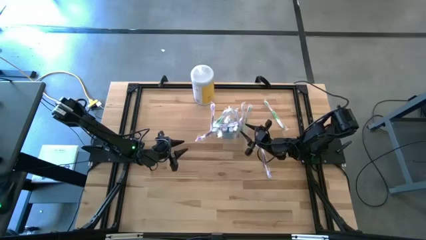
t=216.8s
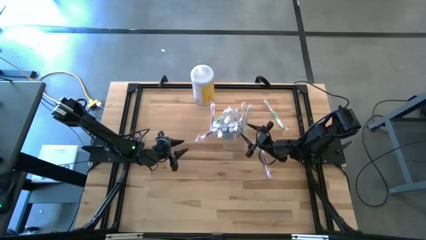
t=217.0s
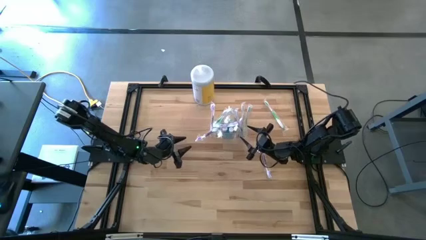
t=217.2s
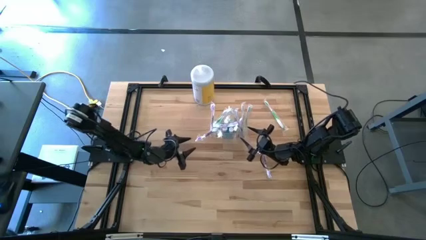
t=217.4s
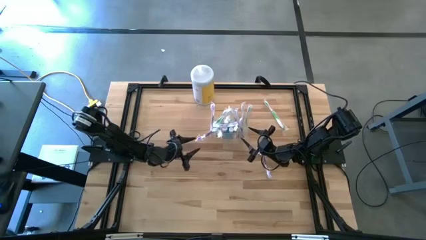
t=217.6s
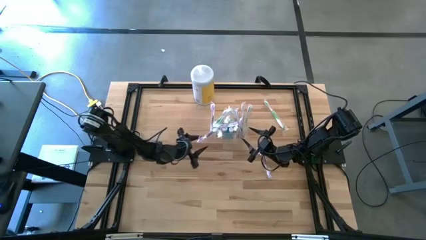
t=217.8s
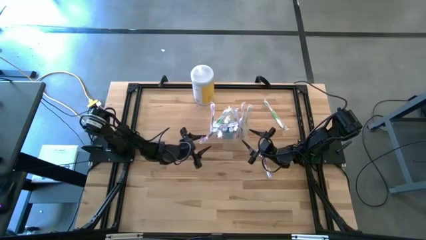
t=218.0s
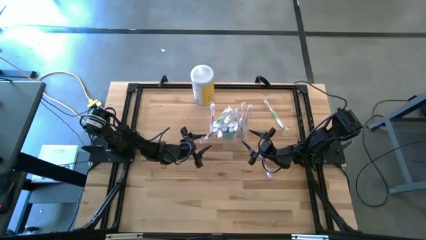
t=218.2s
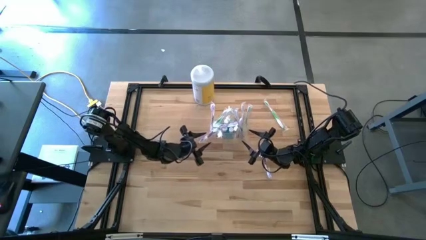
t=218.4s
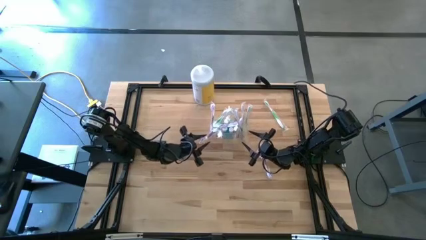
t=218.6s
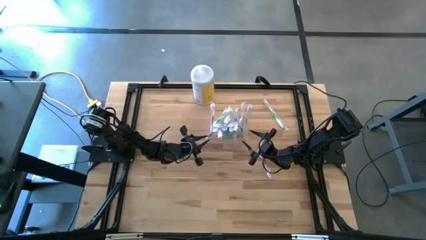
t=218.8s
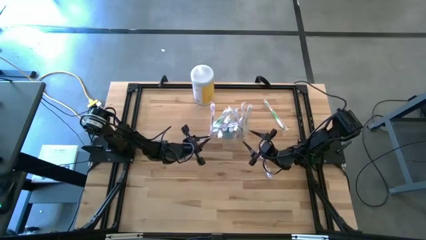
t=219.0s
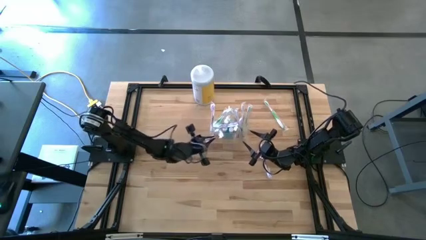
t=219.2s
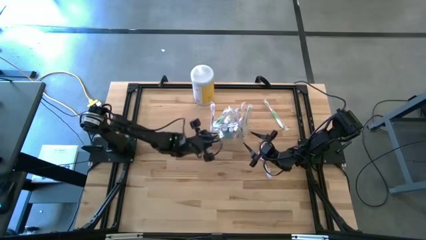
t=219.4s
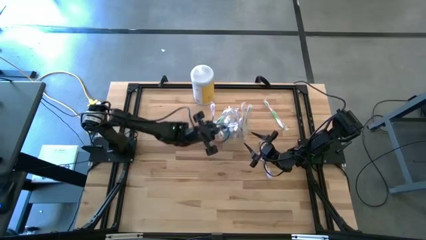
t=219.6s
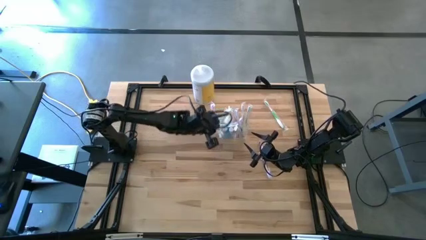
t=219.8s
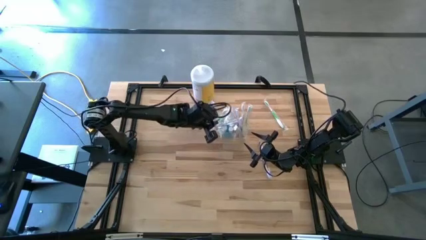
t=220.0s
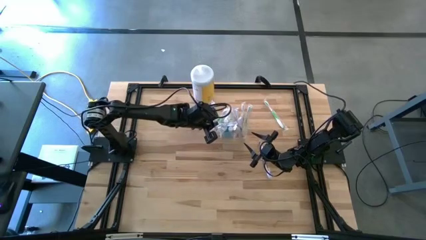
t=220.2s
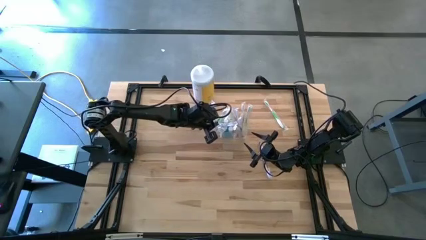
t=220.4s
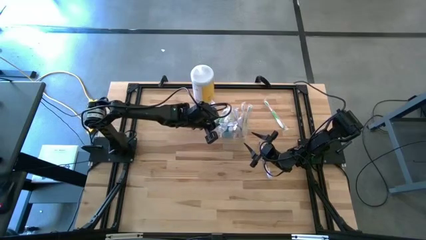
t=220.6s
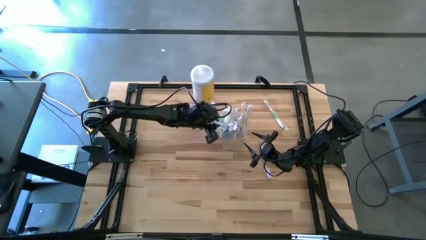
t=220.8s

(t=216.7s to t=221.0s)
Task: Pick & Place toothbrushing station
Adjust the purple toothbrush in the transparent organizer

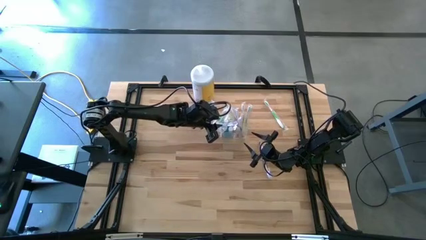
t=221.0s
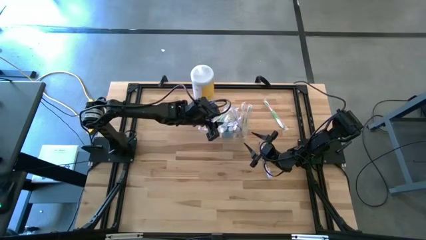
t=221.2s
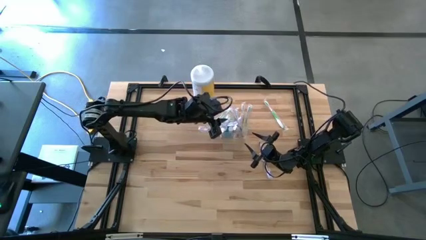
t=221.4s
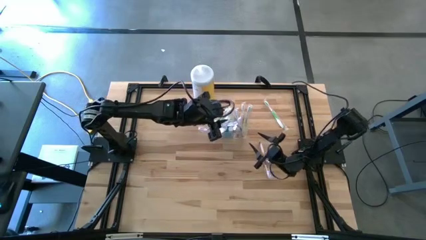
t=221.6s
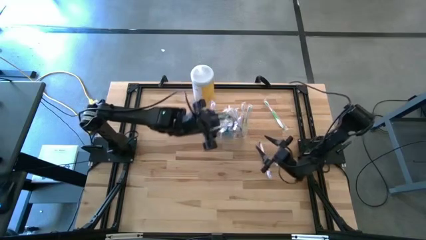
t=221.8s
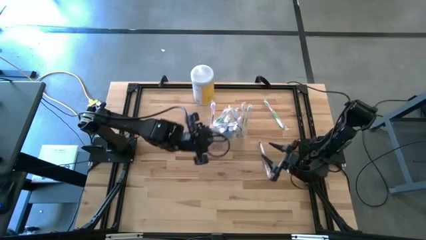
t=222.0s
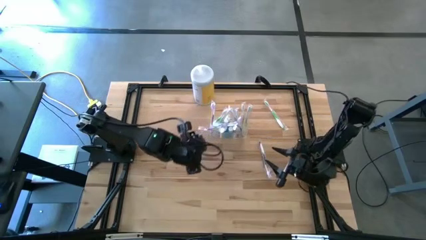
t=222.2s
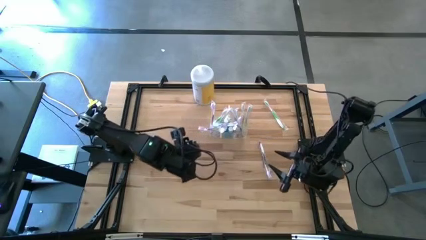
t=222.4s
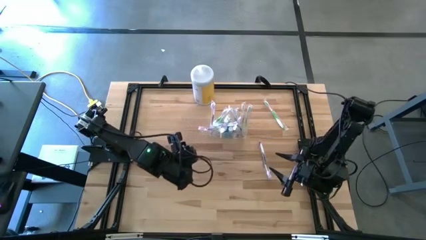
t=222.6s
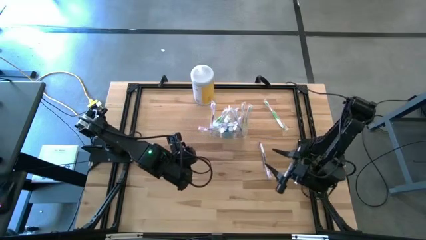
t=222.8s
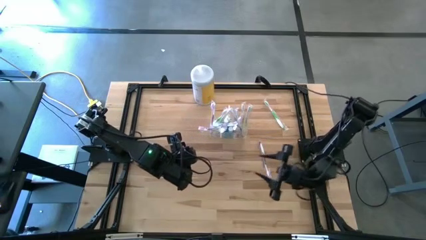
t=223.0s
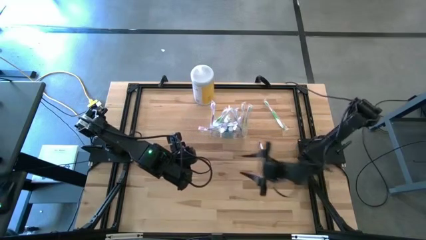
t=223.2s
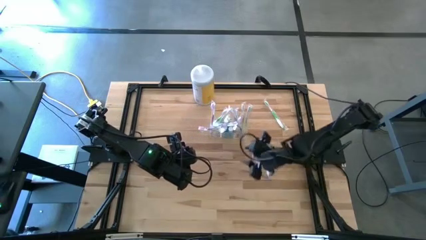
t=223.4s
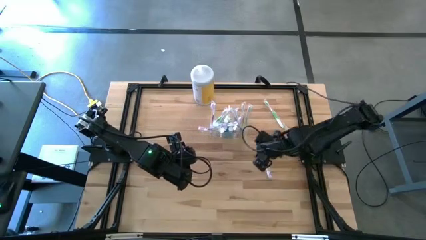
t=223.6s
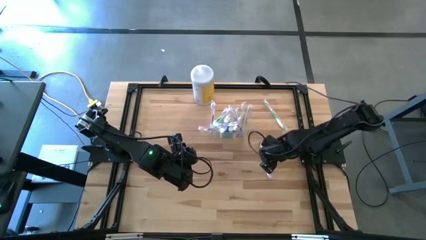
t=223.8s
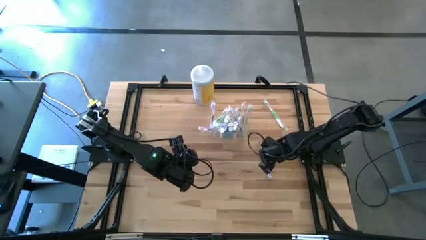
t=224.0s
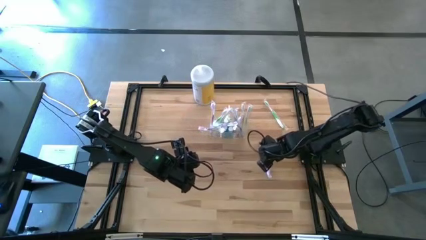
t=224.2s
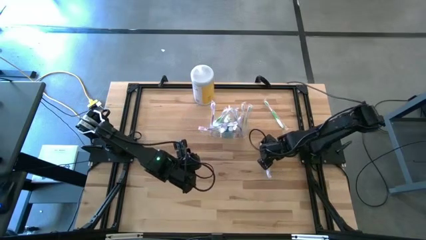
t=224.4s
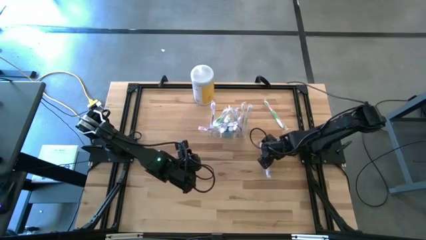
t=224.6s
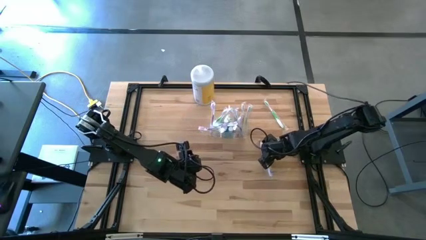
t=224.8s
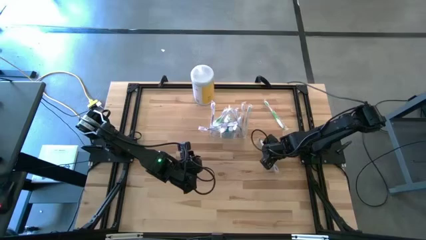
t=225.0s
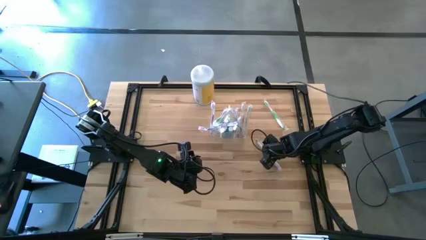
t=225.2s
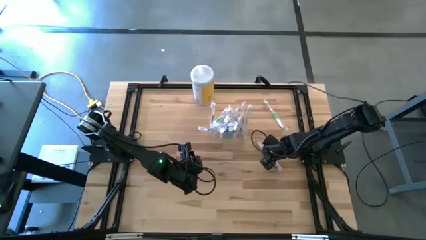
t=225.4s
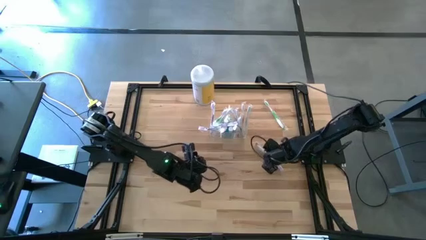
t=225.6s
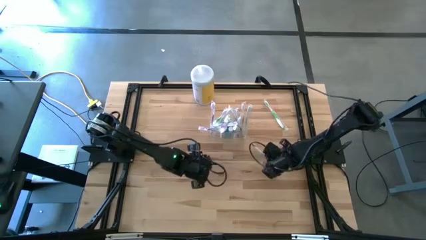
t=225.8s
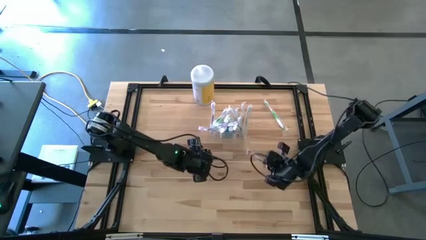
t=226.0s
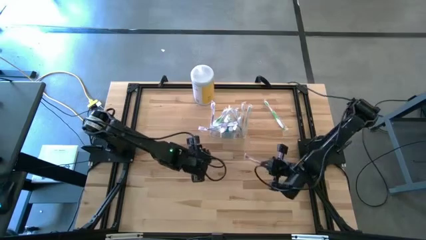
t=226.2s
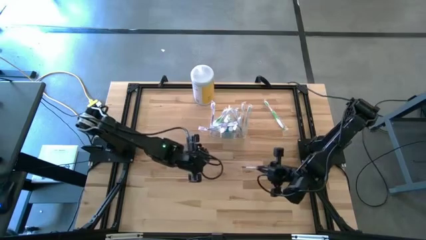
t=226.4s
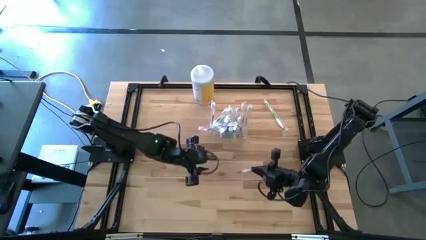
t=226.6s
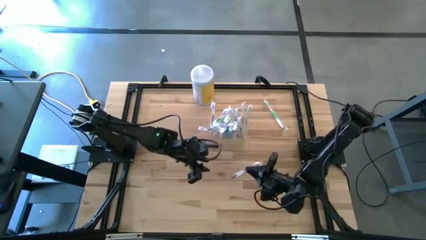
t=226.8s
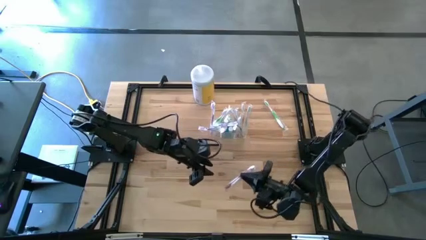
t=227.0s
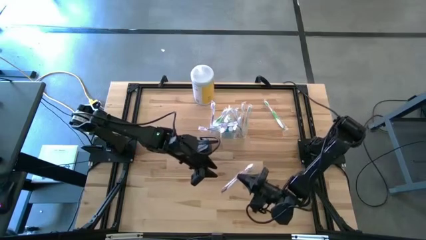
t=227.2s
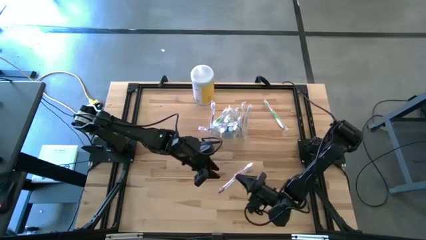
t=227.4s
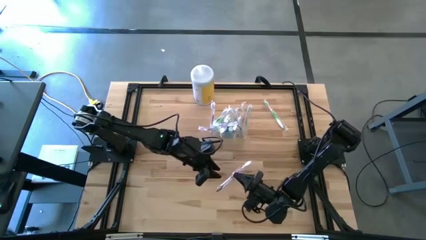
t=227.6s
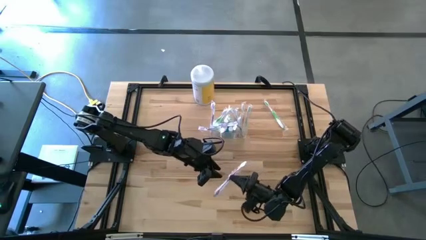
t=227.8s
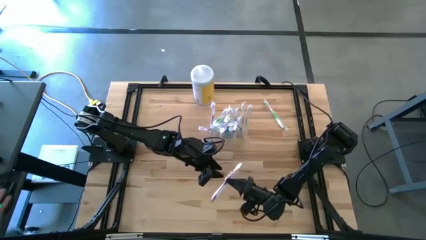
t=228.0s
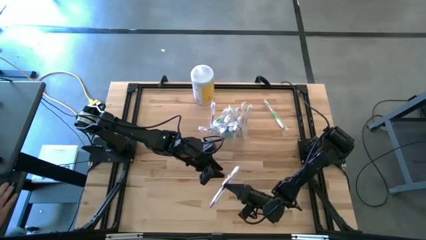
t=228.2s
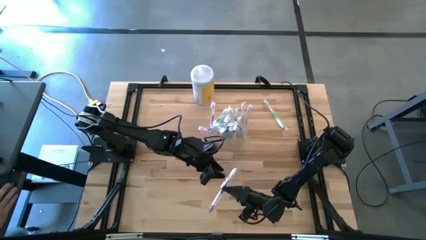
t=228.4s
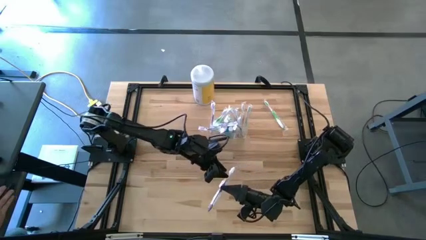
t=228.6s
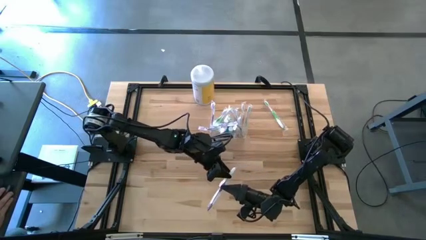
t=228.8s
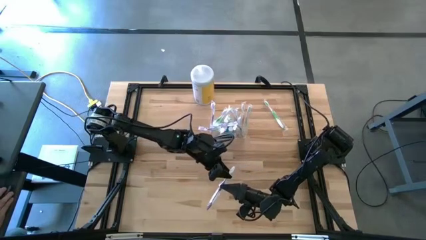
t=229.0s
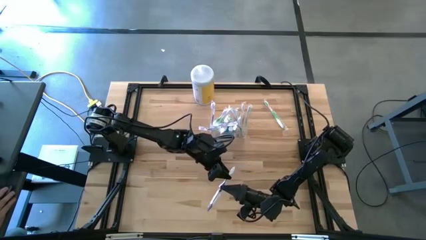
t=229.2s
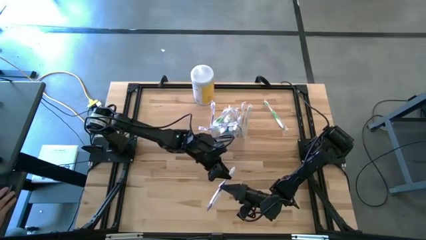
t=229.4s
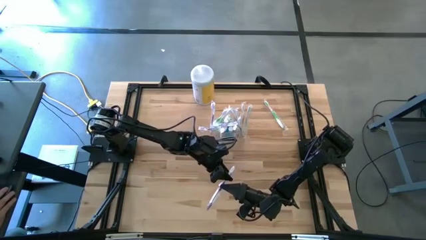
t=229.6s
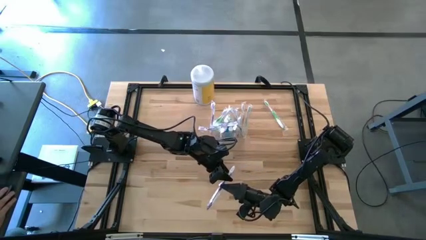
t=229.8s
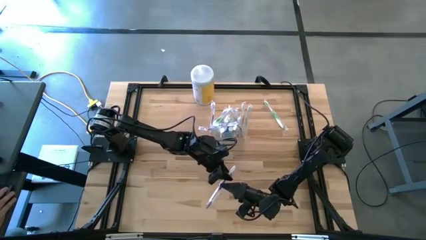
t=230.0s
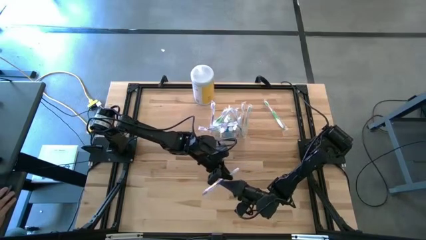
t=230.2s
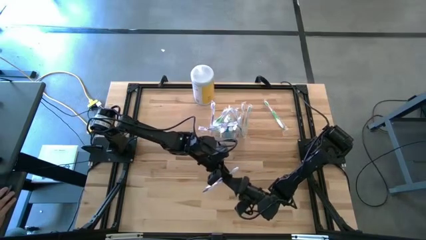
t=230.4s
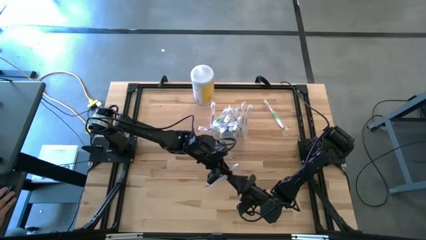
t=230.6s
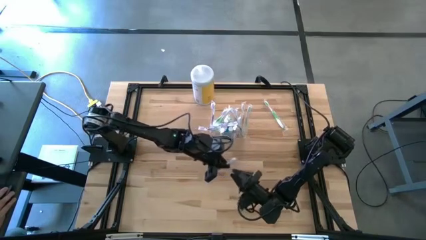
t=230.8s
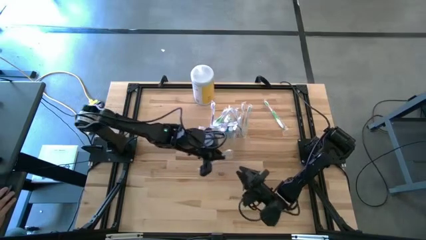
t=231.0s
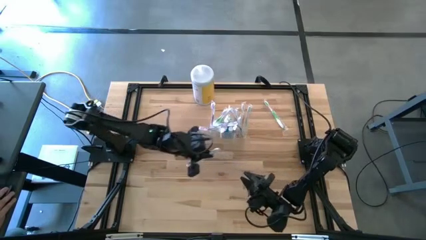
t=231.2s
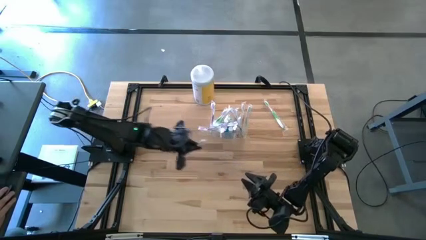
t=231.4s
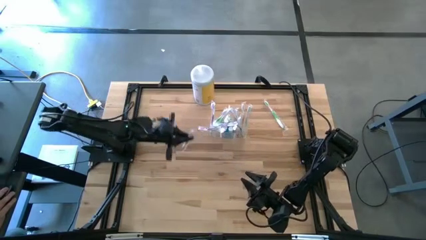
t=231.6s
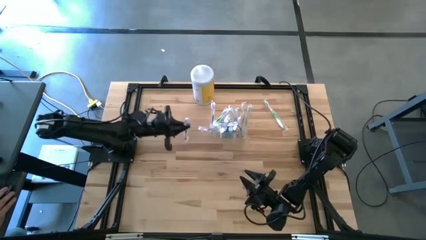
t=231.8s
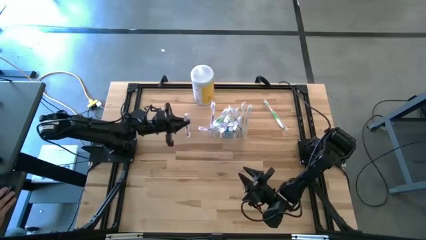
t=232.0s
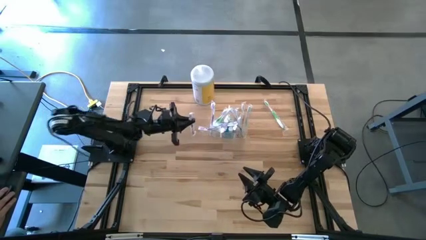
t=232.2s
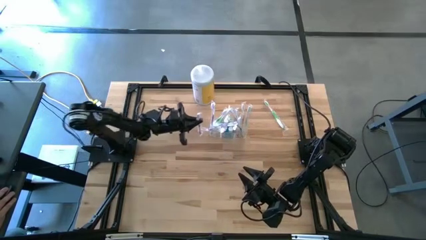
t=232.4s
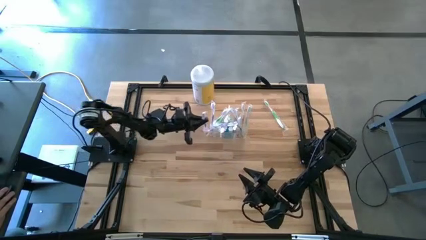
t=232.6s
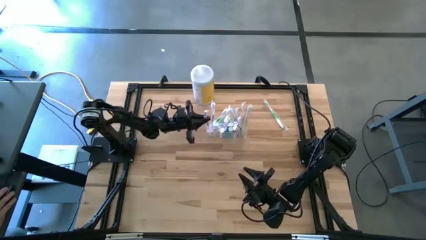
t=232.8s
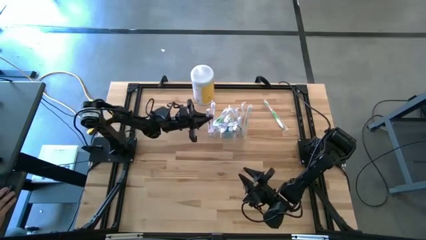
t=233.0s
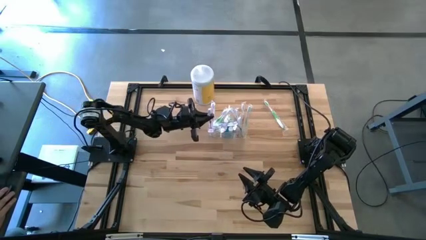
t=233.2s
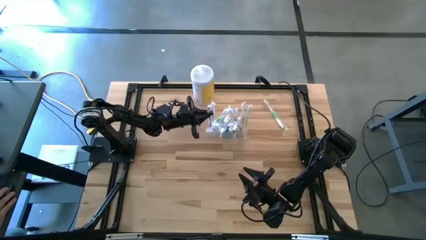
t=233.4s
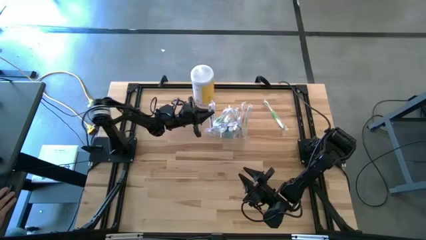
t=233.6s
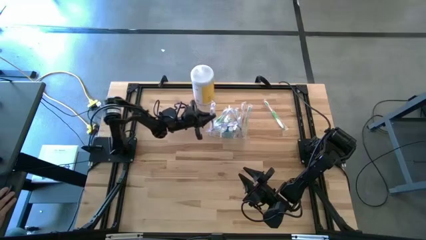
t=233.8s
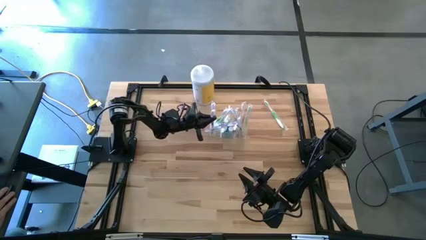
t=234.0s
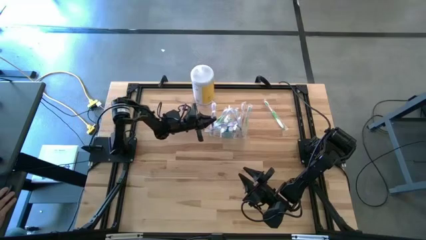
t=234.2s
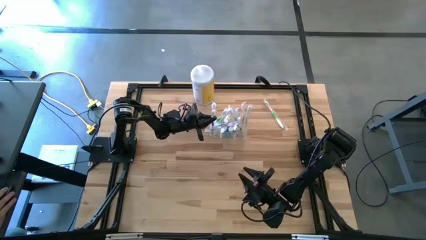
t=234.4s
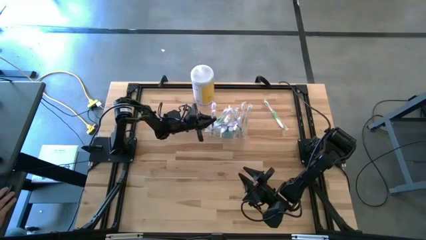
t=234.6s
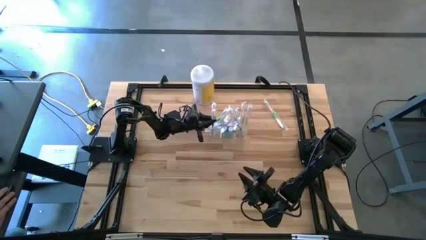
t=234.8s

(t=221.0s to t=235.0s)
Put the purple toothbrush into the transparent organizer
